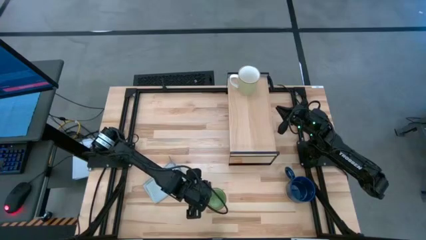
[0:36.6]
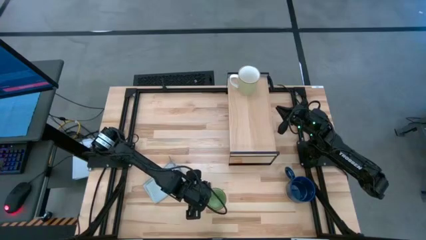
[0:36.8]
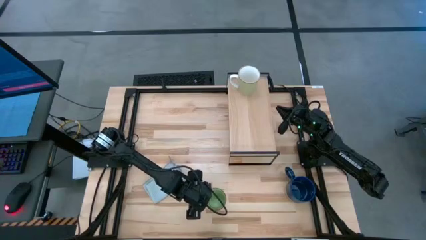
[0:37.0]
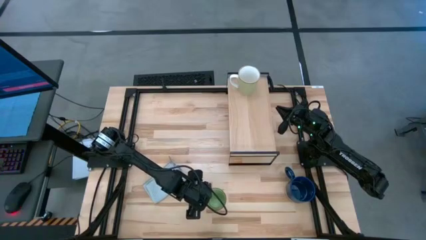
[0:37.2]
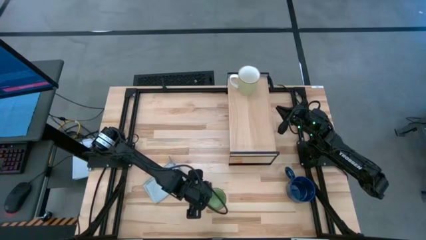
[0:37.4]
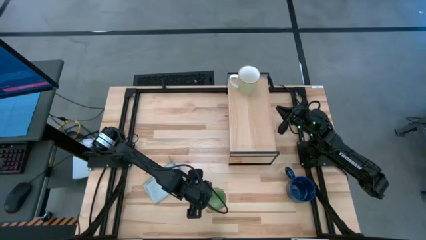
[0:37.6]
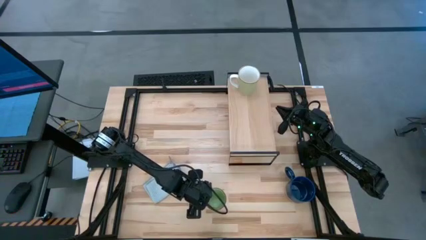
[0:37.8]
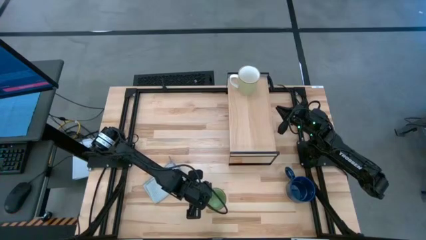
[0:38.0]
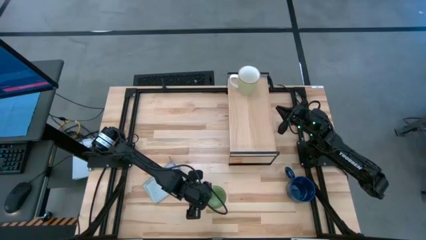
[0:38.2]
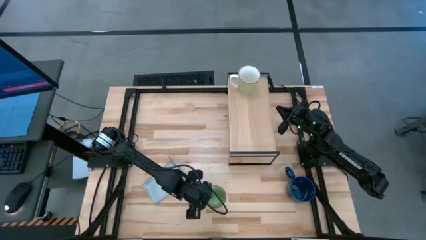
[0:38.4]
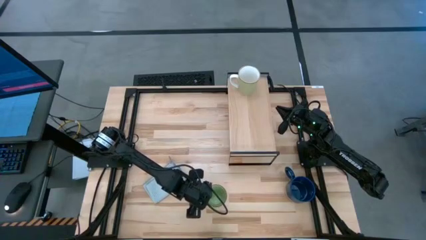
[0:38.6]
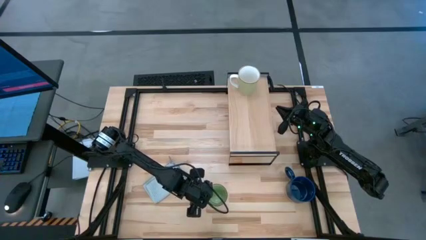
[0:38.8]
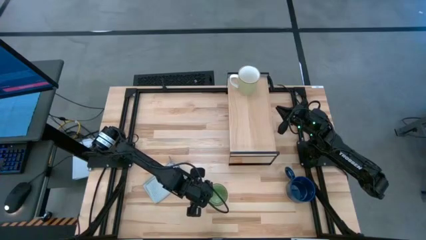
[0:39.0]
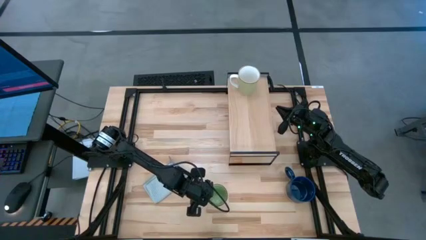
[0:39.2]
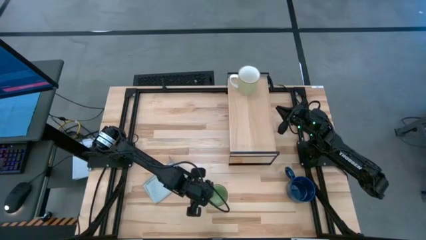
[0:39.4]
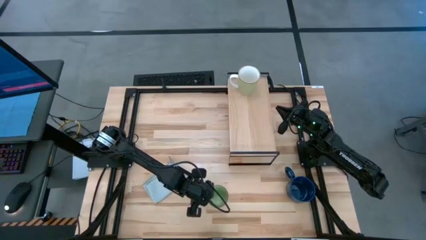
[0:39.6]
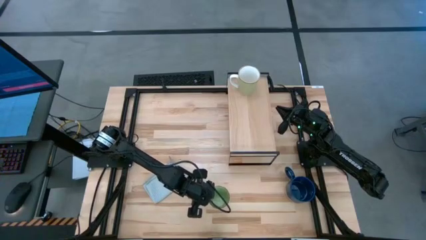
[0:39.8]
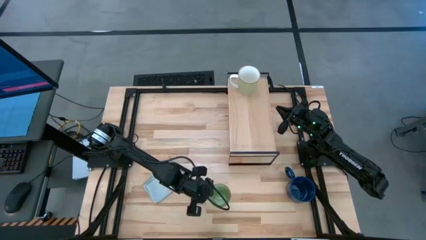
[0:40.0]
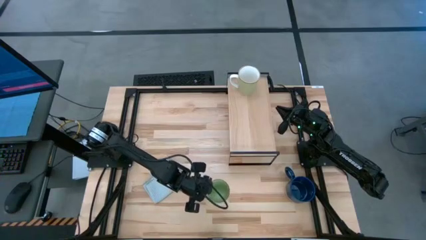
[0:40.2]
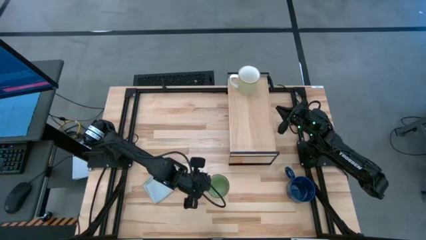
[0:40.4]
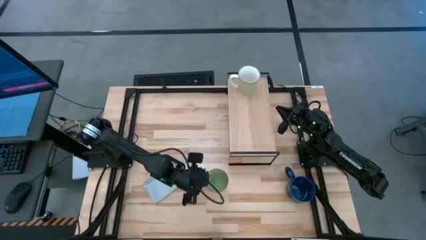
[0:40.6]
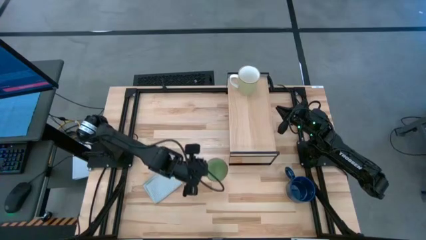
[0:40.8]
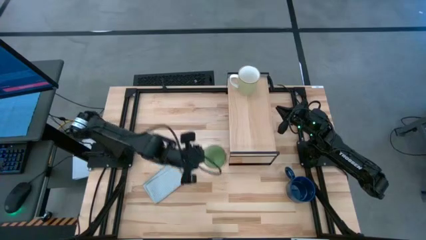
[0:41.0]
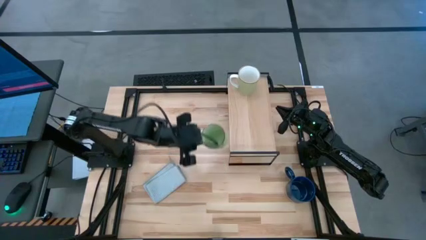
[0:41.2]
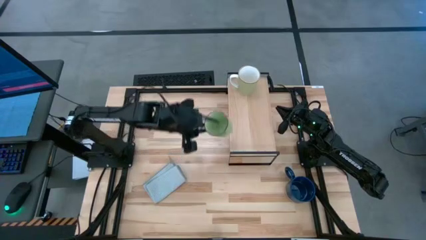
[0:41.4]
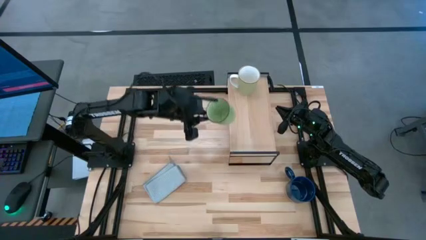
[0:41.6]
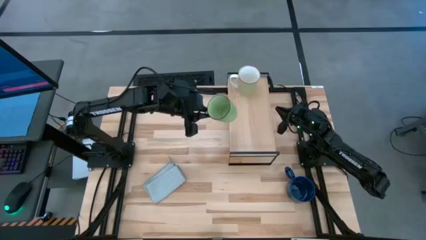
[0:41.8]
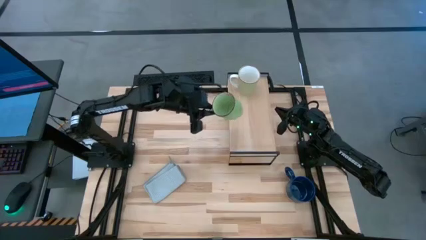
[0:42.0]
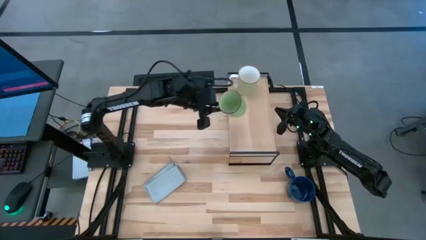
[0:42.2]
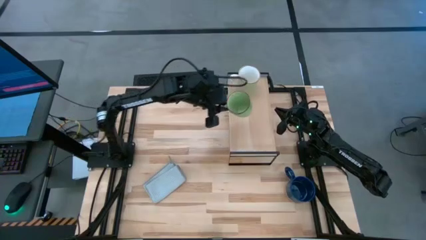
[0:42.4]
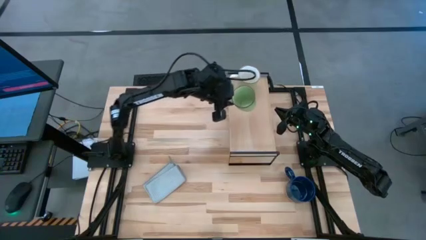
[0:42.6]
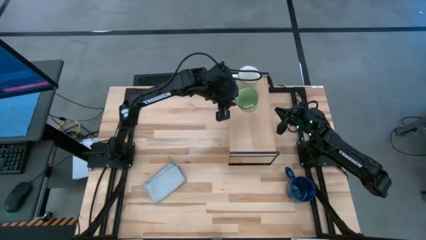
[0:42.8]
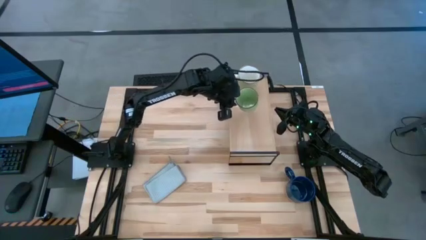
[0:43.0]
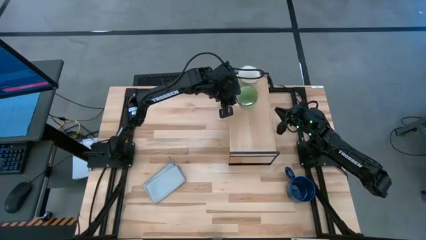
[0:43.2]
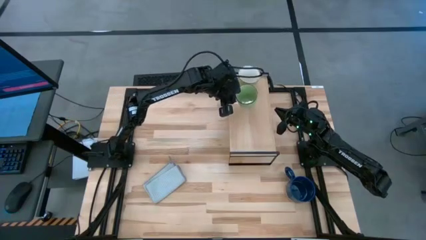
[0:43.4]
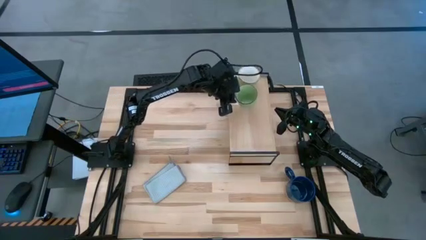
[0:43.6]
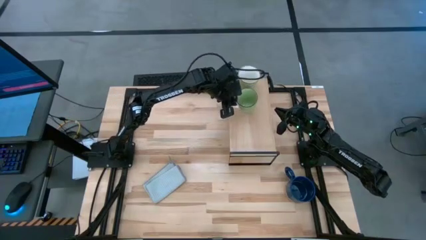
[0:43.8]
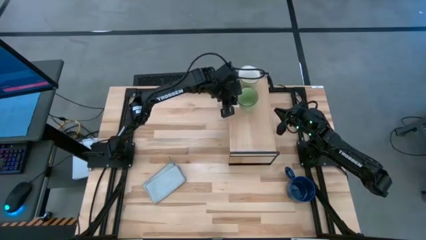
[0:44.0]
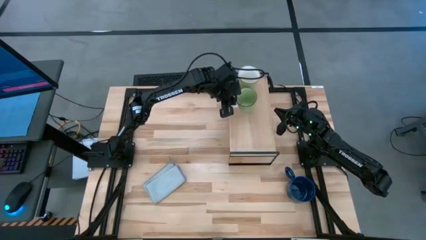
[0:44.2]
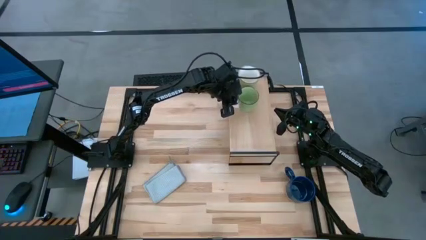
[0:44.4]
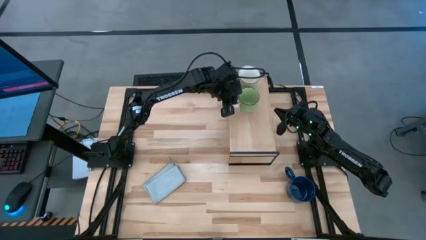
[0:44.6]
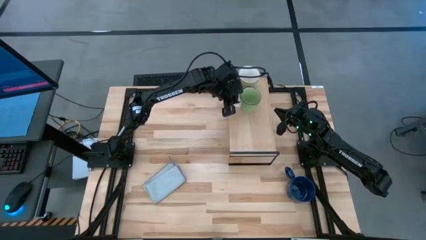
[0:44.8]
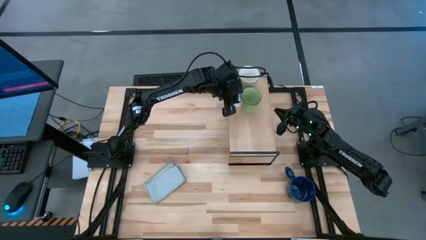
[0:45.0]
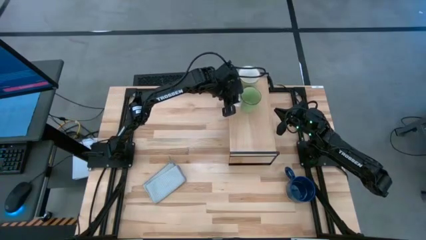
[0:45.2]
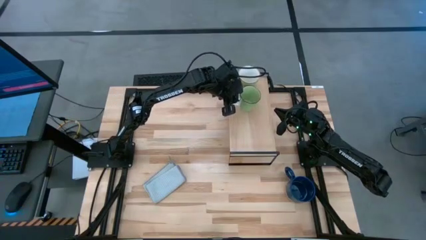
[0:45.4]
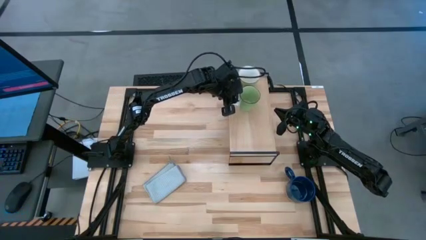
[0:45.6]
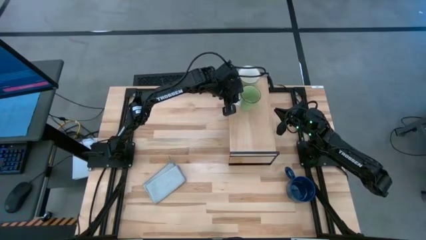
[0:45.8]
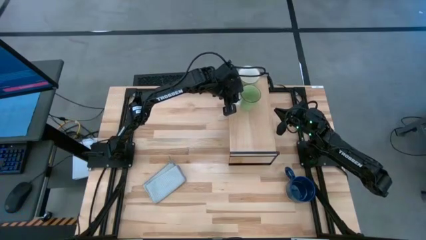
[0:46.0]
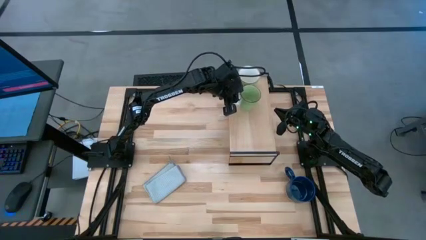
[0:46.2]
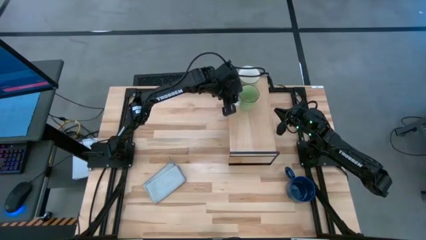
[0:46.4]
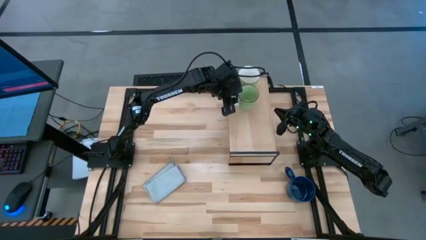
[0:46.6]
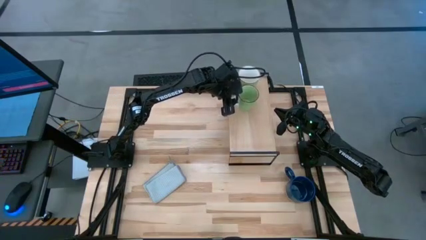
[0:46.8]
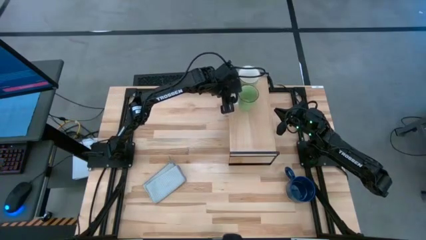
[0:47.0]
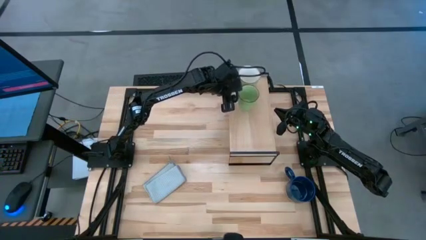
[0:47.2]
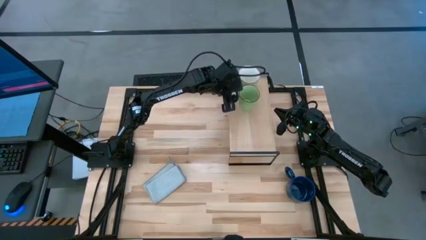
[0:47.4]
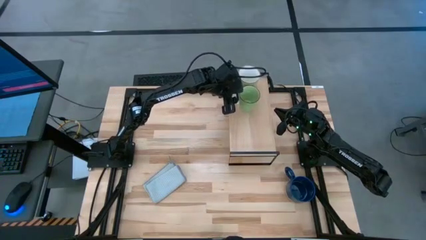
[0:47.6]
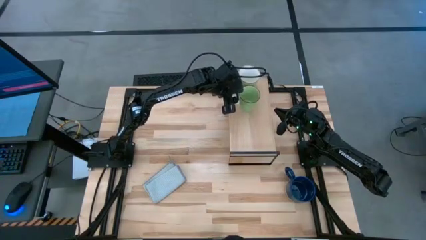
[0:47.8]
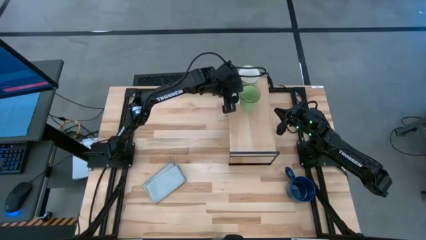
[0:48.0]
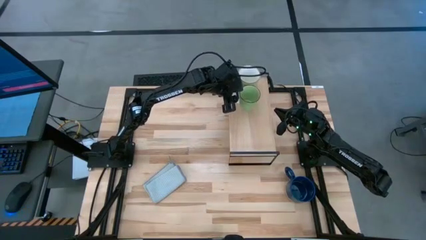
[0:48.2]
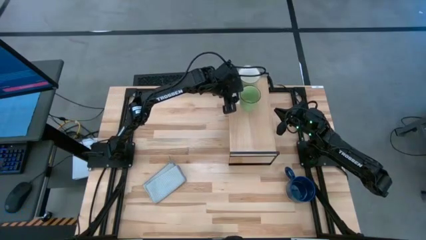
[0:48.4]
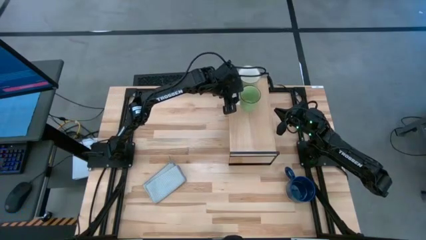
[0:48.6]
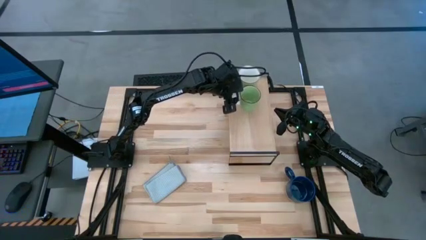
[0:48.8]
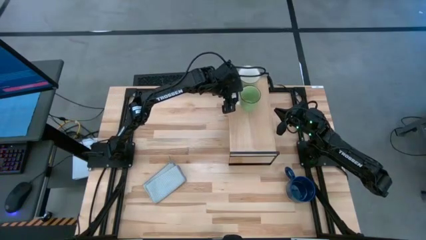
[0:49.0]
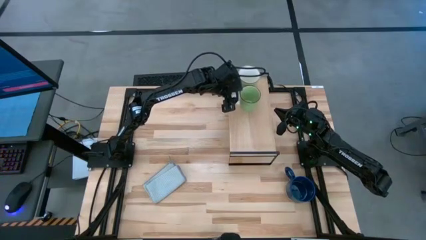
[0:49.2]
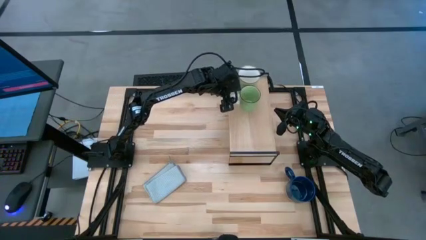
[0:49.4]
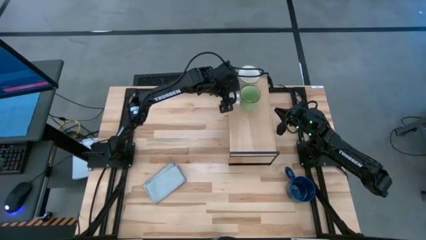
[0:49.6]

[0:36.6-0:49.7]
Task: Stack small to large cups/mugs on shelf
Put the green mug on the shelf
